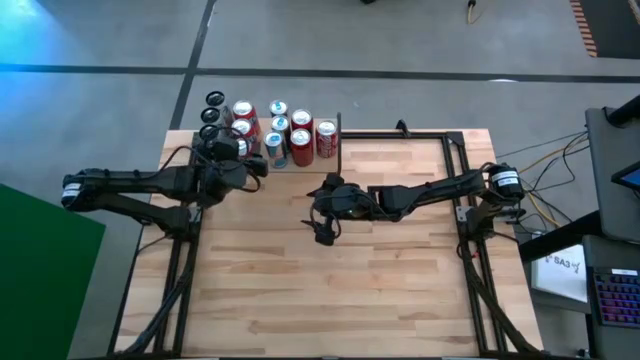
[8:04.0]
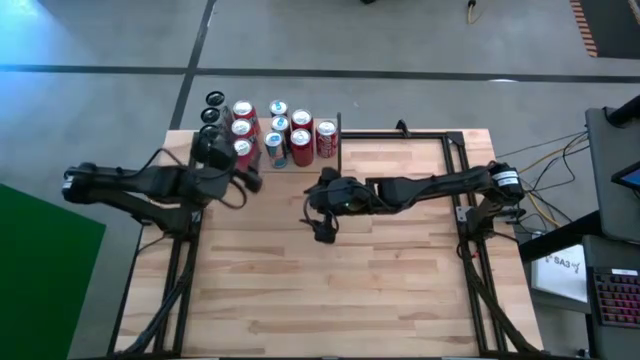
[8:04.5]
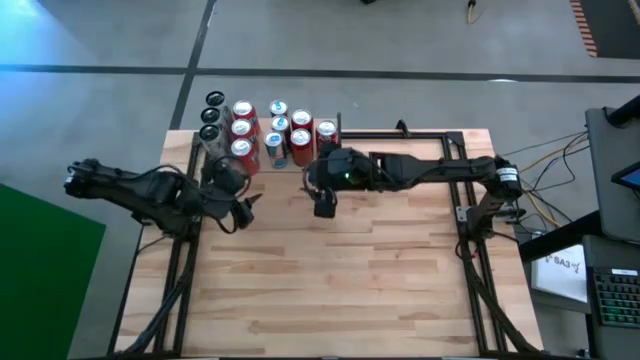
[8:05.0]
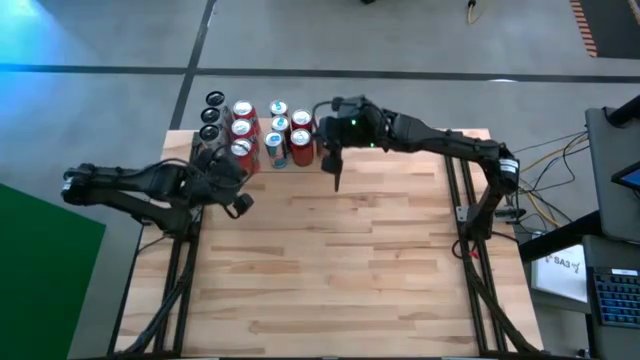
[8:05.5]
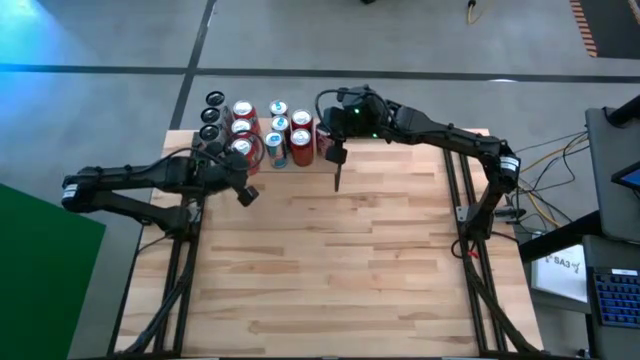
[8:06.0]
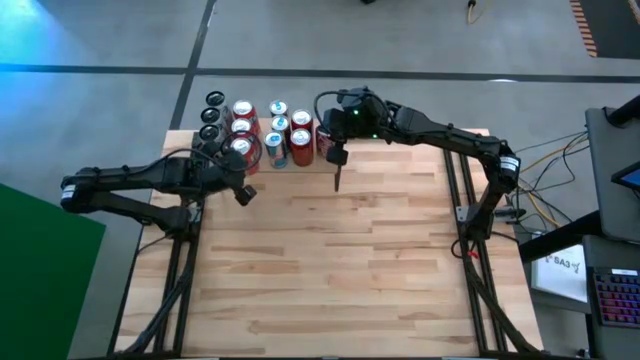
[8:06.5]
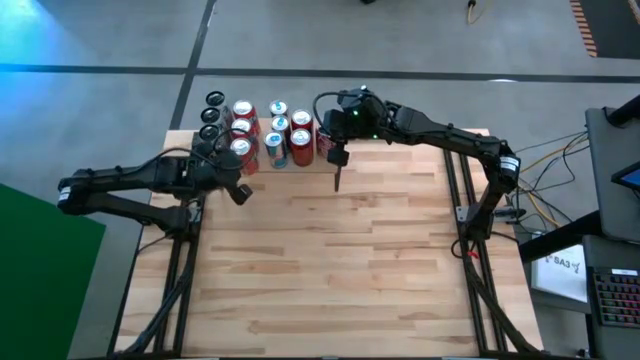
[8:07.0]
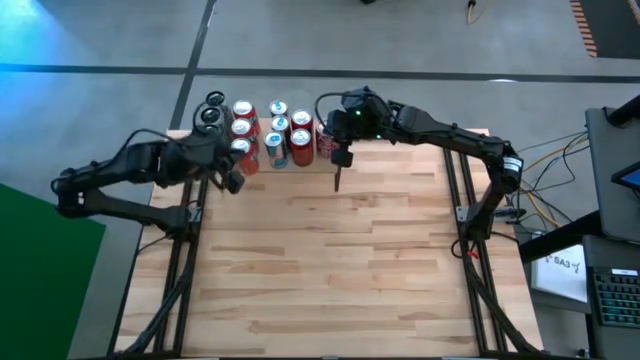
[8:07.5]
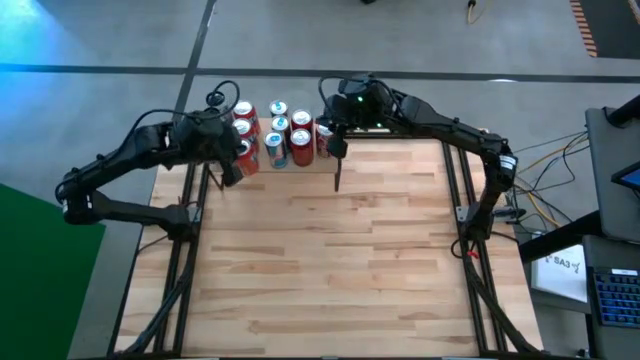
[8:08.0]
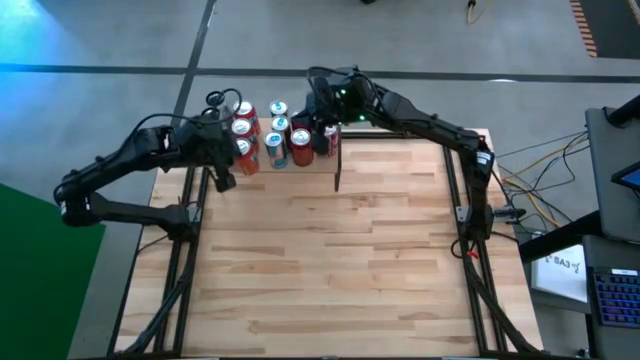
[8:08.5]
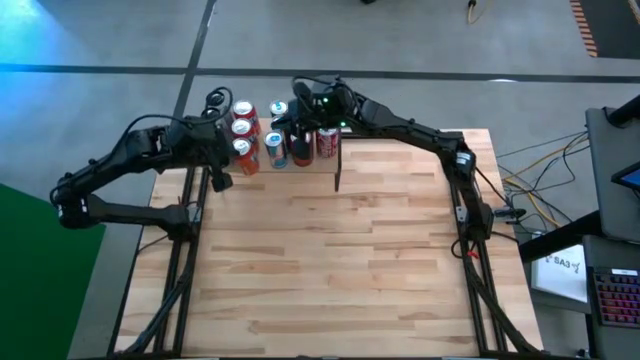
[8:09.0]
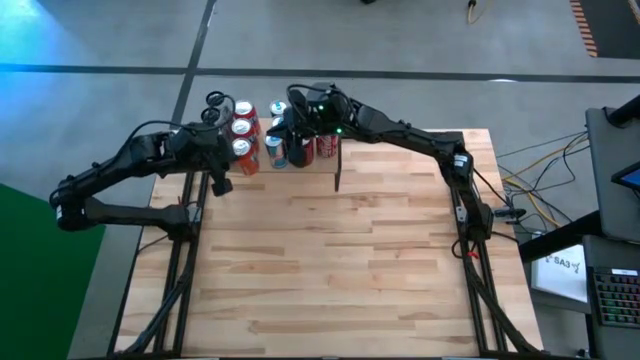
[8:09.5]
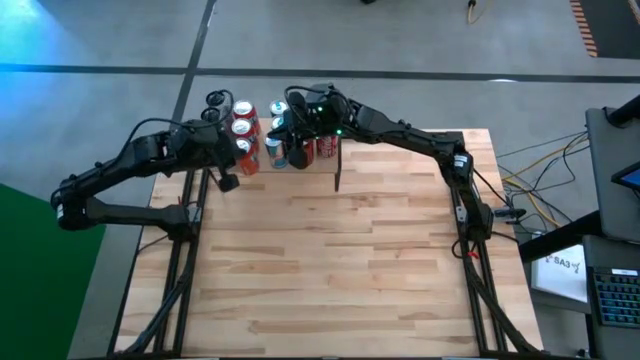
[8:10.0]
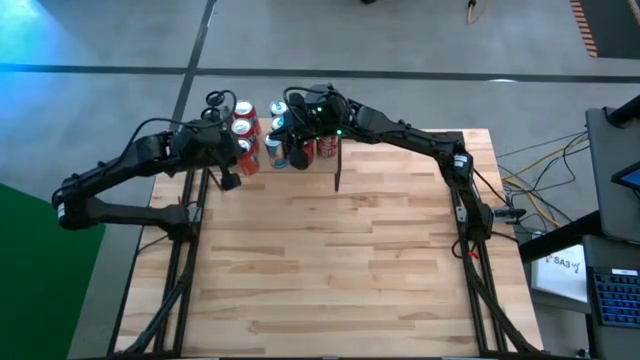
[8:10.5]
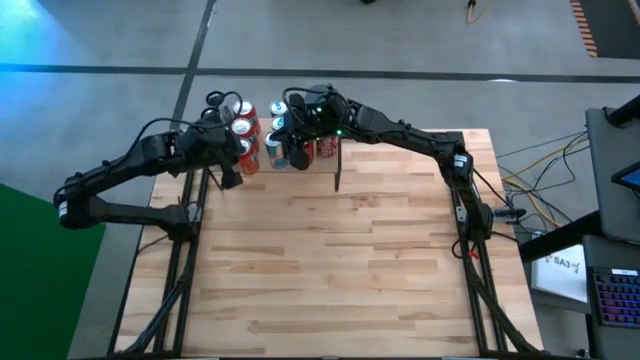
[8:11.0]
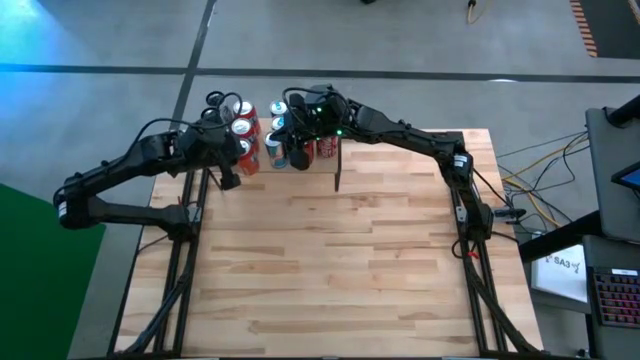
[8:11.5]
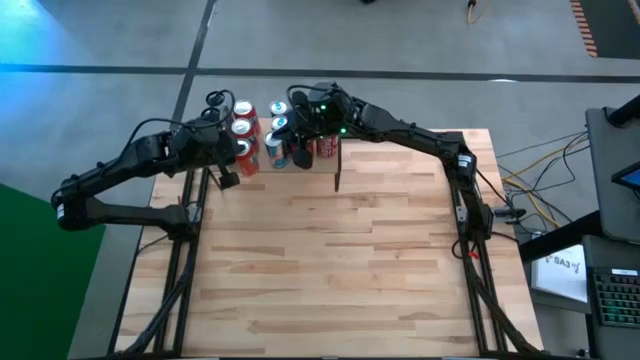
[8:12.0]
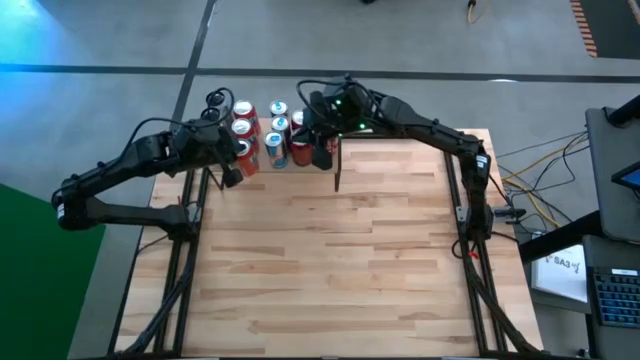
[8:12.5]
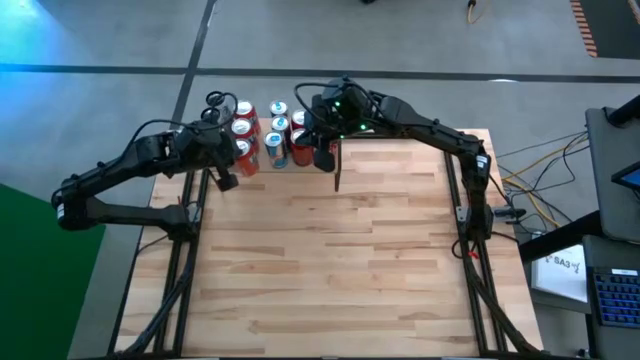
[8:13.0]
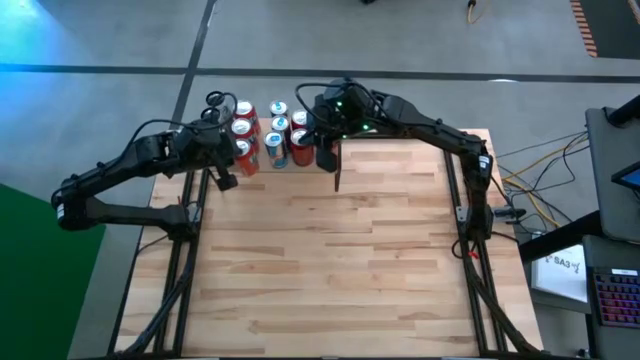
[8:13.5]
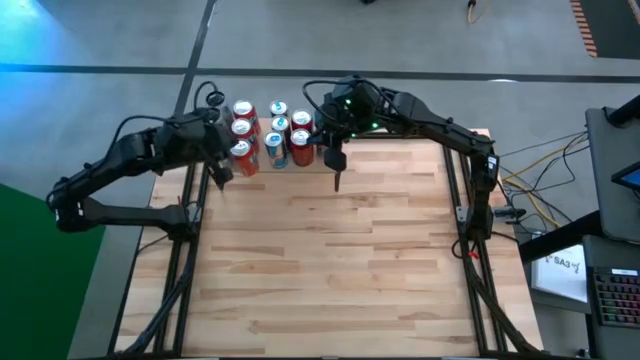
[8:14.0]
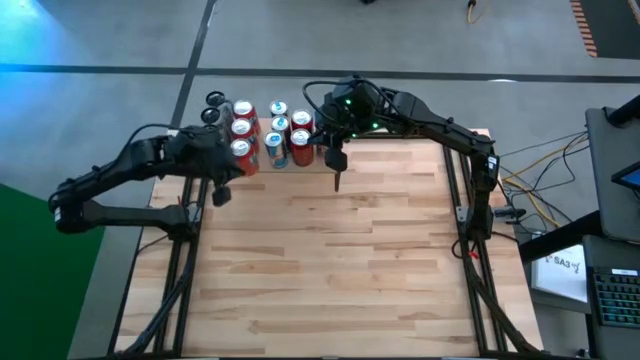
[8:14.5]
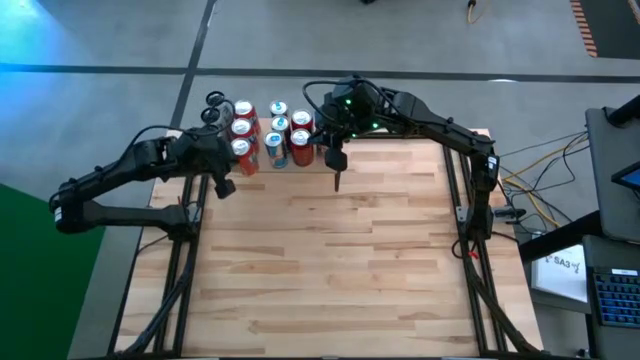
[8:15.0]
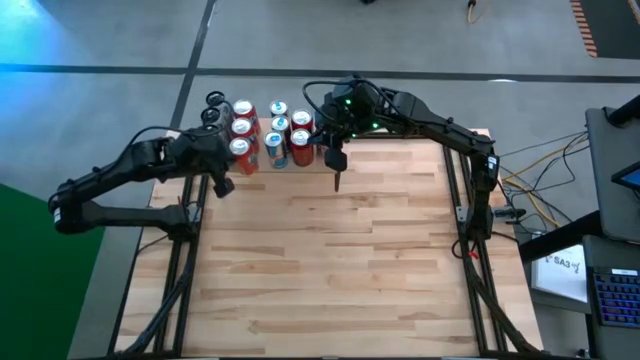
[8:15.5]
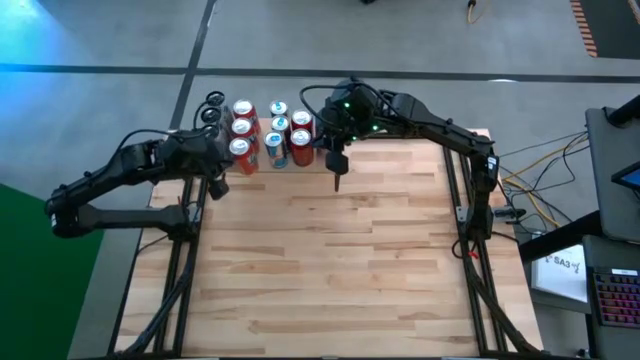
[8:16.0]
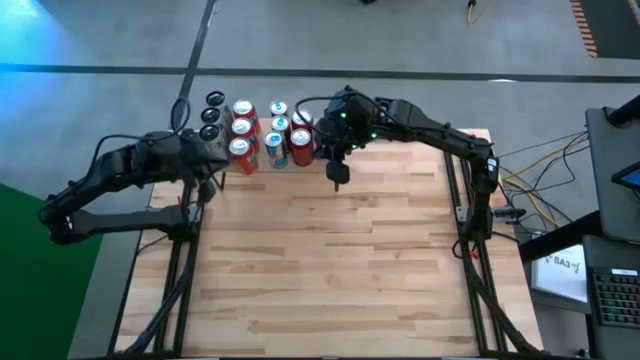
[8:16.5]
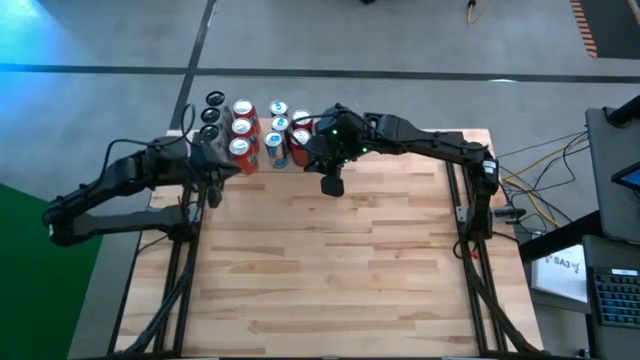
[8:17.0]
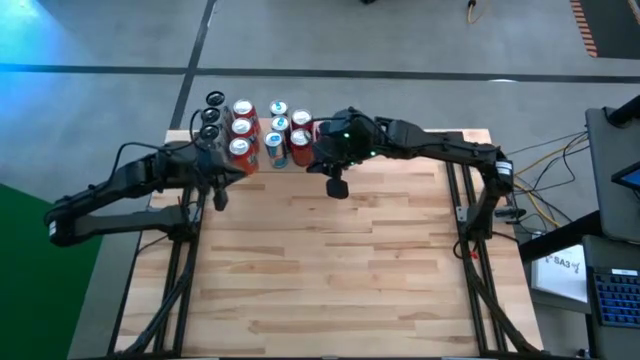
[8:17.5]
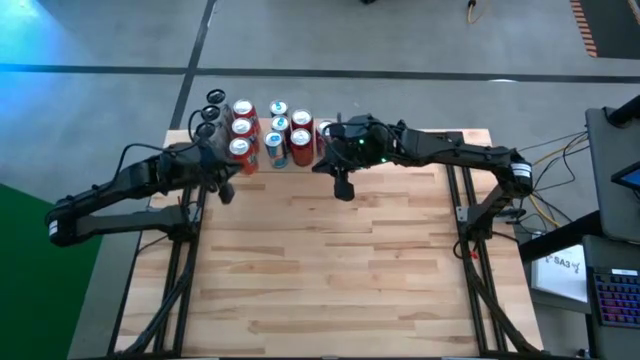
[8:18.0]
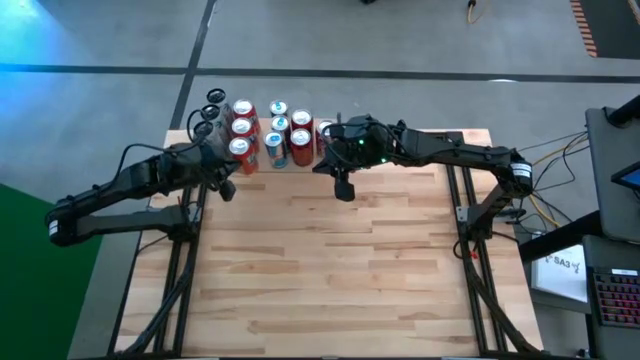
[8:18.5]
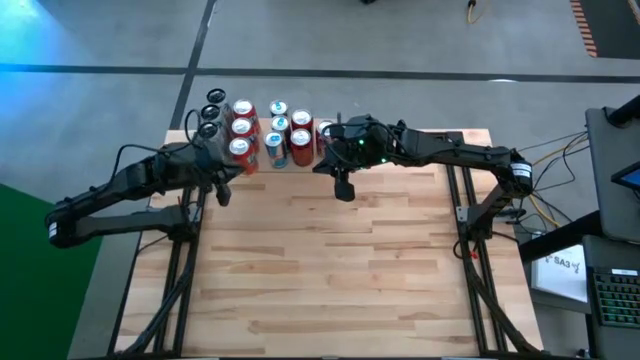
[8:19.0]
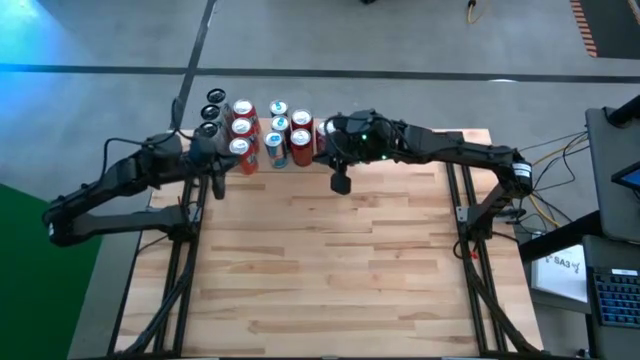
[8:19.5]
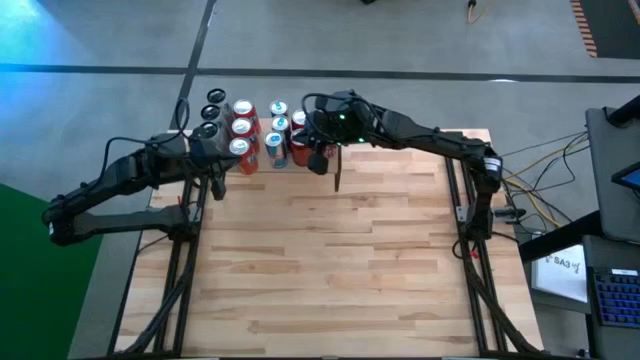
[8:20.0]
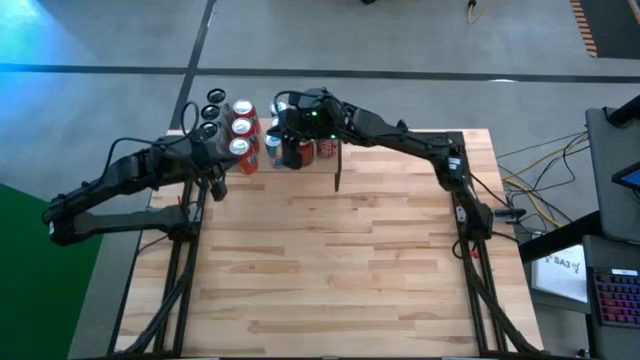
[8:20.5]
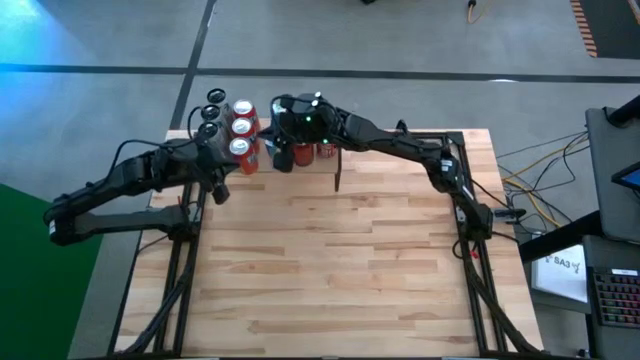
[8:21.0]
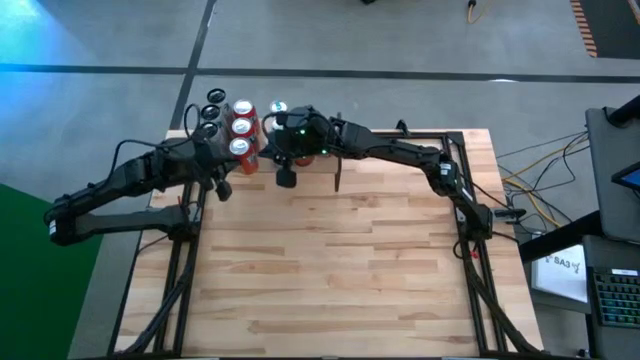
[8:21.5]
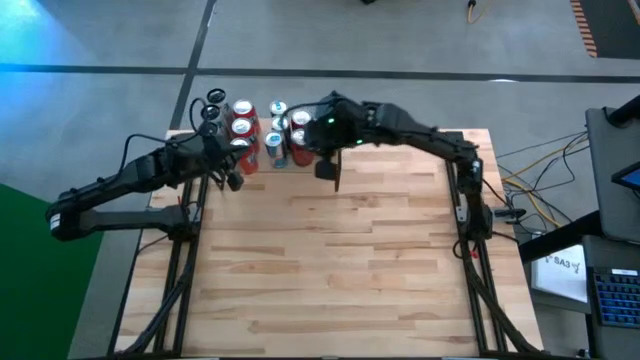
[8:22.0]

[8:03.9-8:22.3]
Task: Place canned beverage on shelf
Adjust the red soda can on the shelf

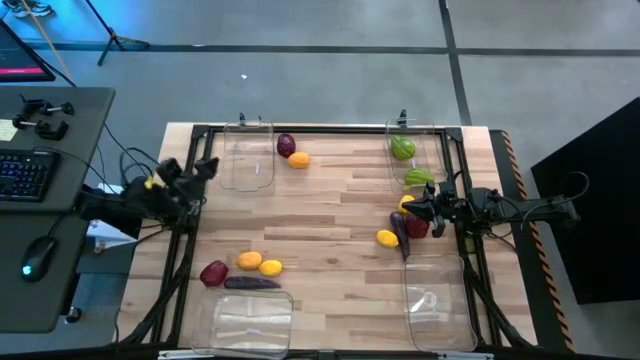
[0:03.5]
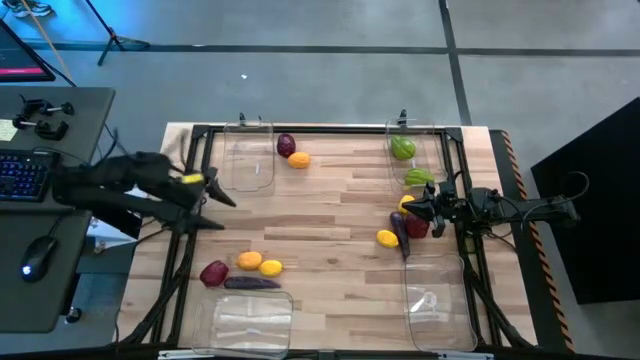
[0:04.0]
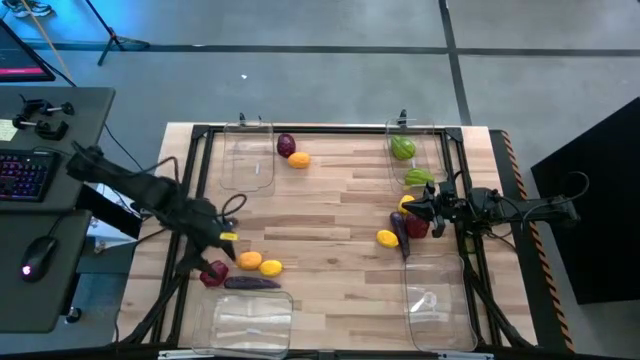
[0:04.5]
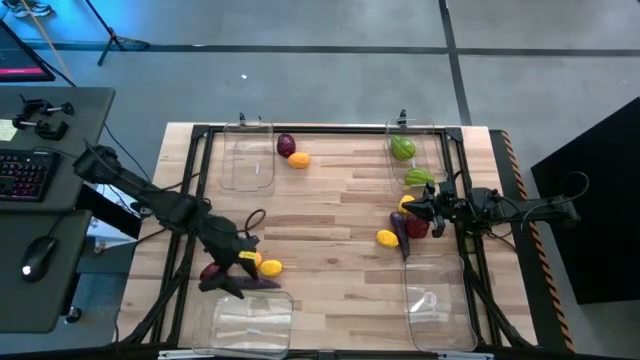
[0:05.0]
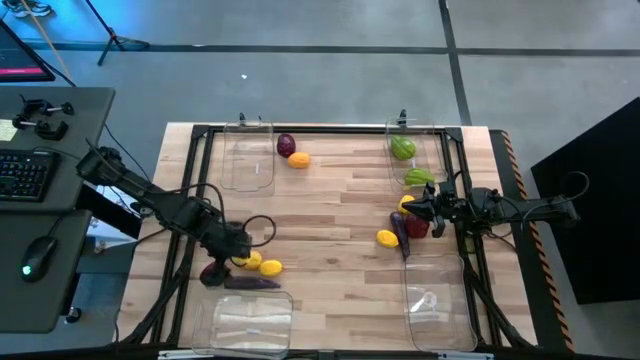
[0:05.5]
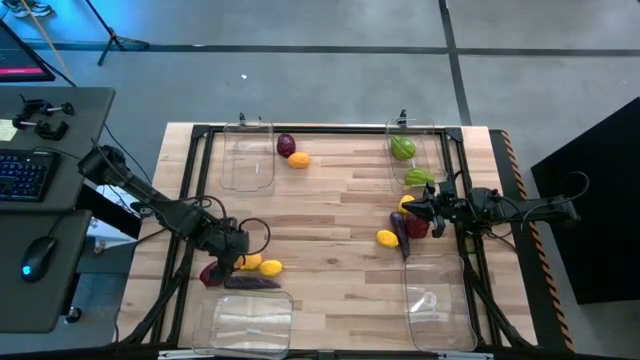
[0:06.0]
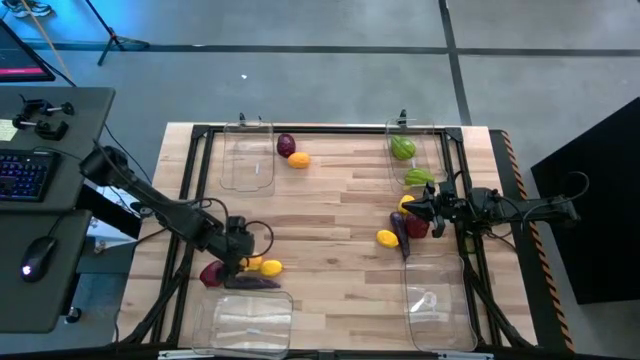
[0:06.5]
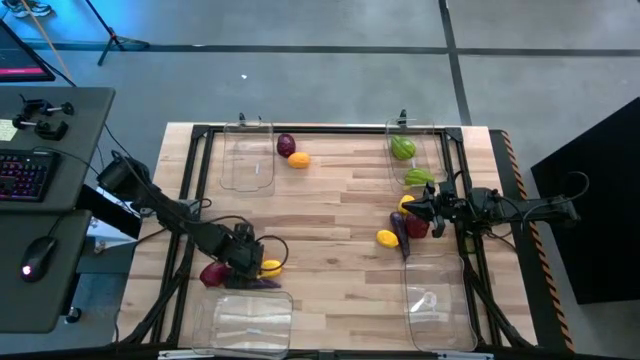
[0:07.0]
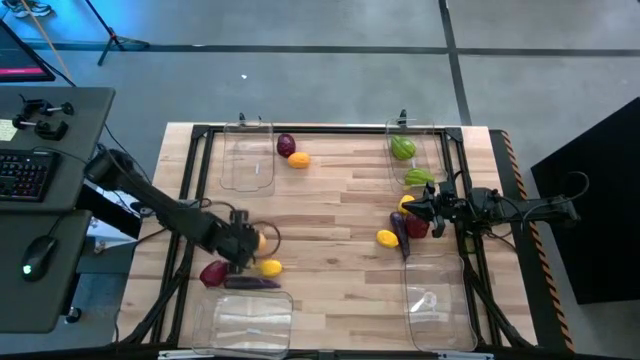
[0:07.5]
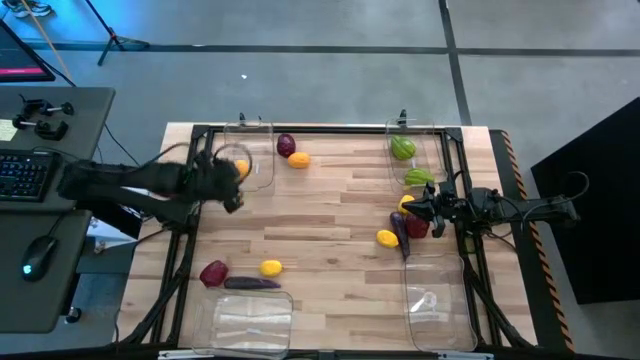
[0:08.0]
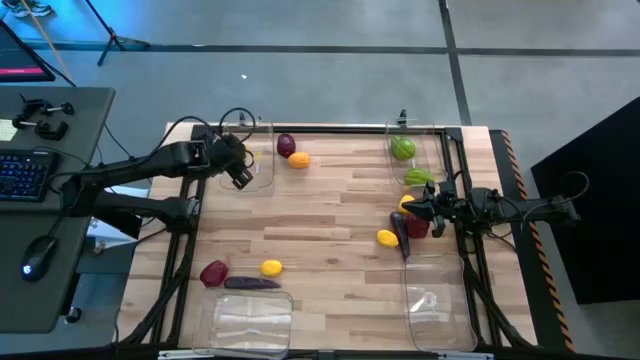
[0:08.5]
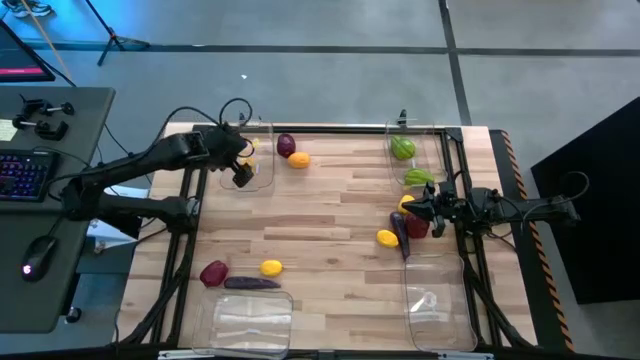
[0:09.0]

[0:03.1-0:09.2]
Task: Sort produce into baskets
Put the yellow lemon into the top left transparent bin
